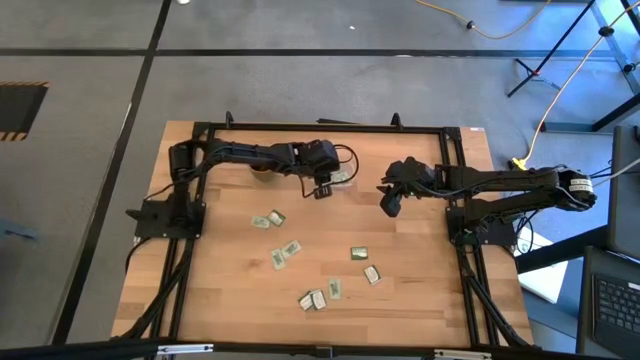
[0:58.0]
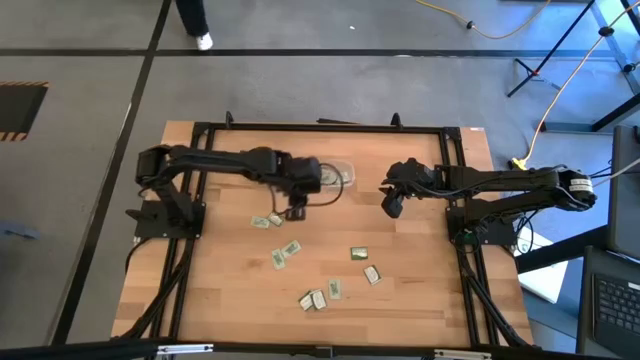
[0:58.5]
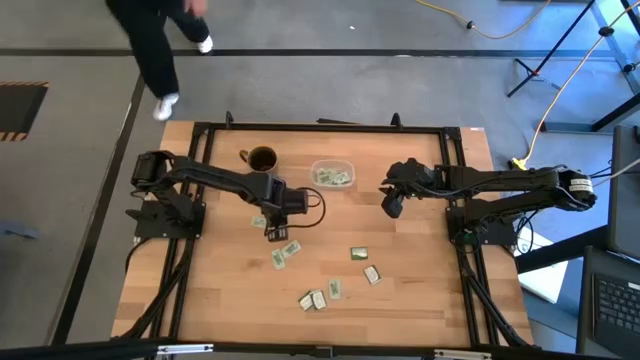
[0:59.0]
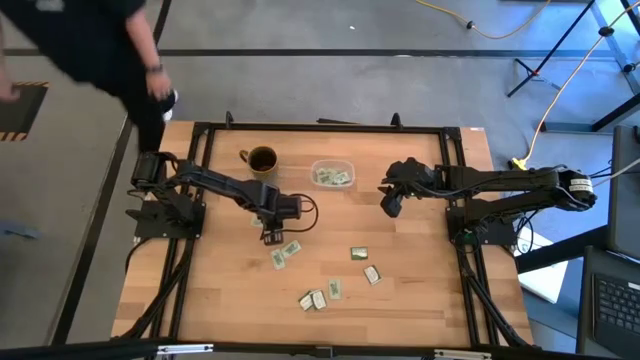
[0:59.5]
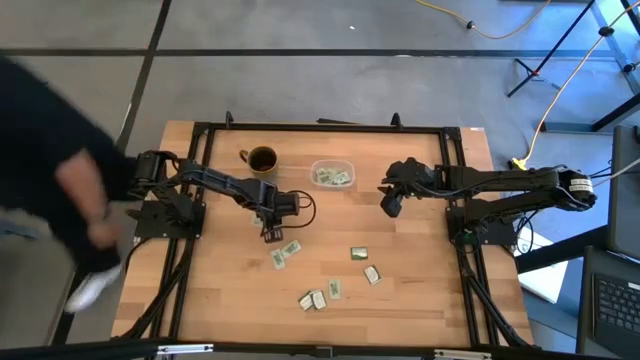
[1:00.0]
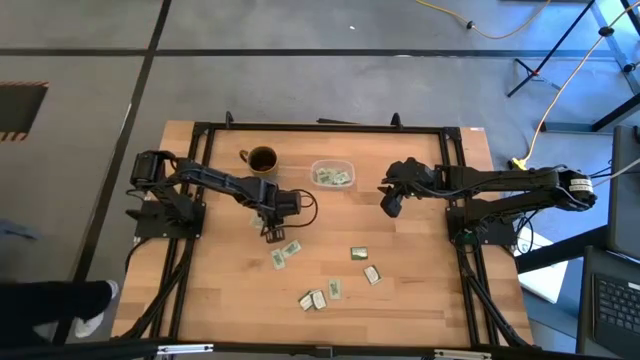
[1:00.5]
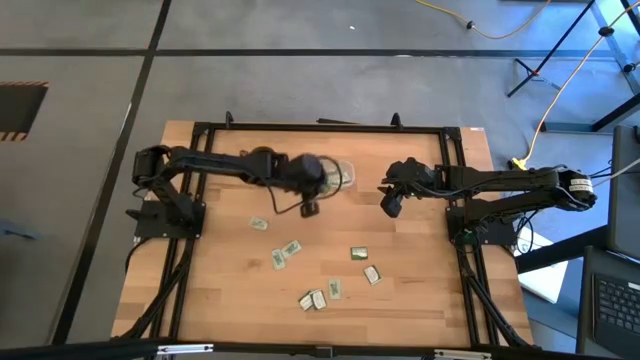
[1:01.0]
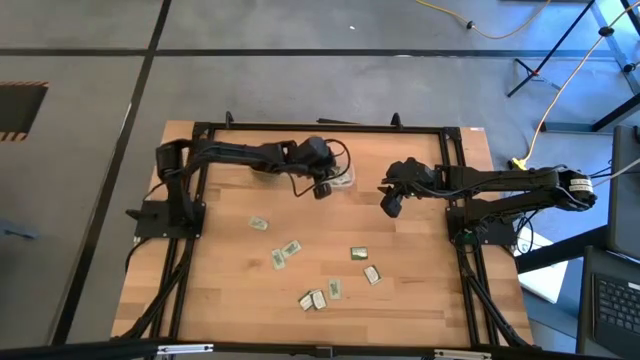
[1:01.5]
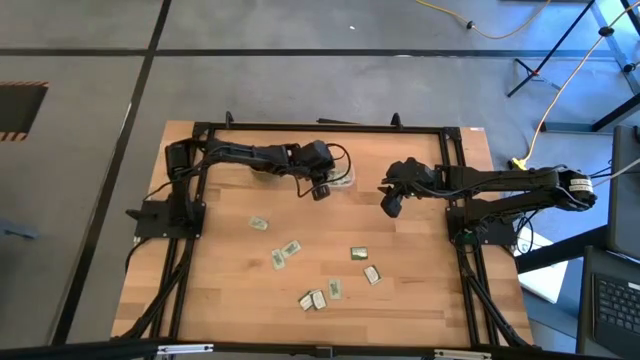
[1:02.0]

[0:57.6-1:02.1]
Task: Pick and place Stevia / Truvia into bins
Put the truvia packet into the transparent container

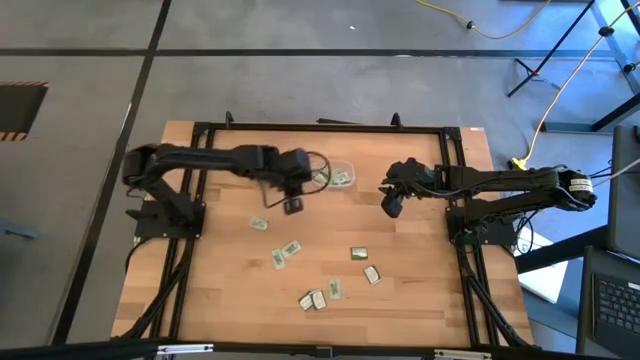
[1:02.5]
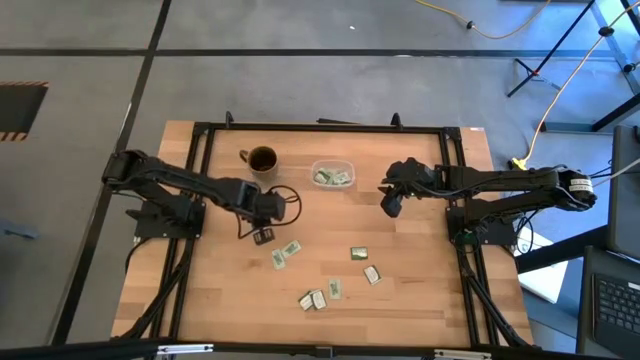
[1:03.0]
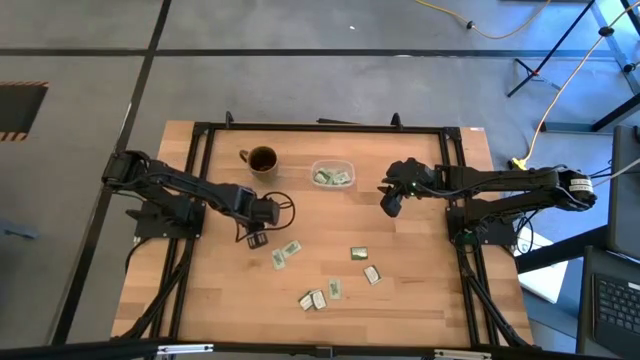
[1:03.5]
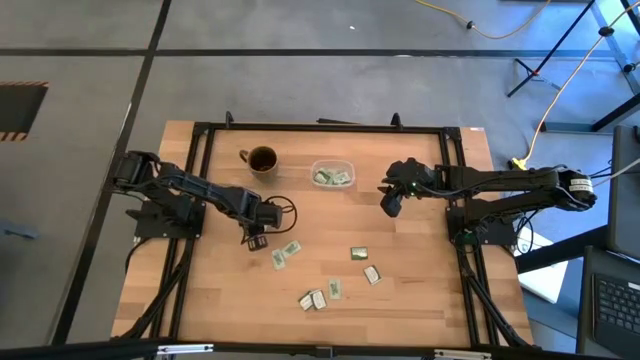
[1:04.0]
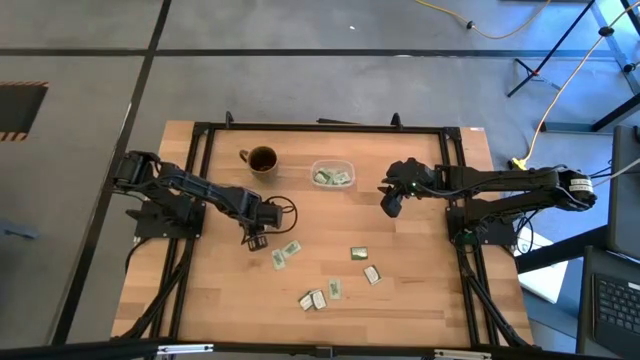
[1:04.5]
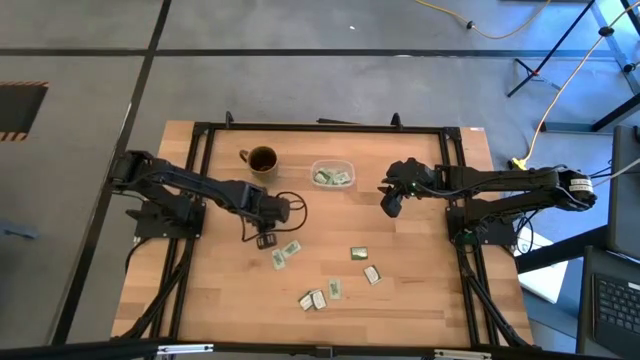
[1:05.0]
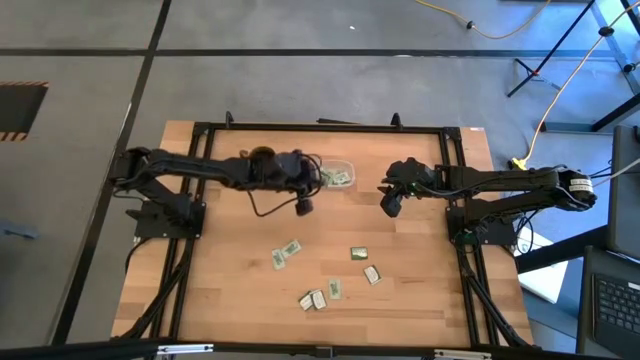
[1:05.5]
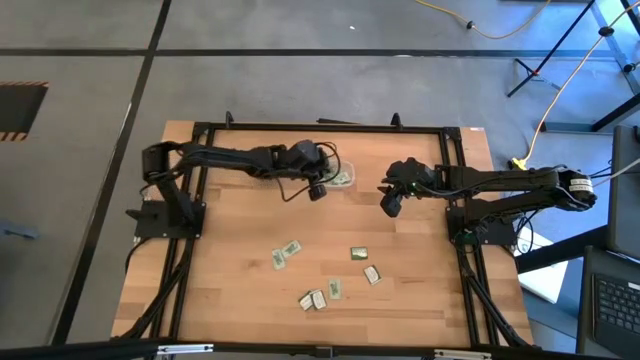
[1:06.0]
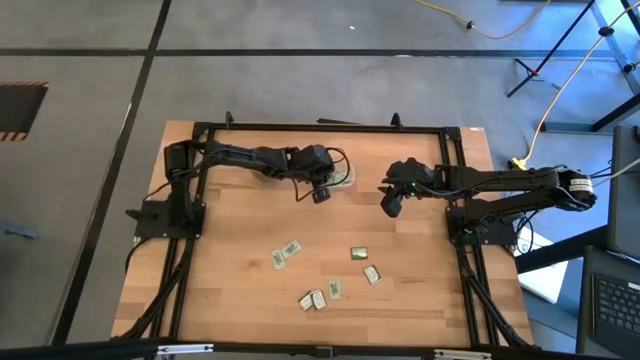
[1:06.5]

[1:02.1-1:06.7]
Put the stevia packet into the transparent container

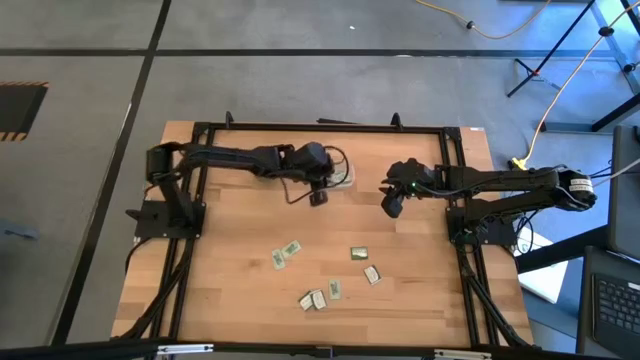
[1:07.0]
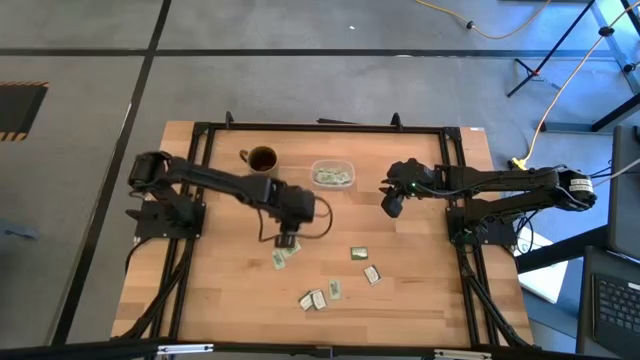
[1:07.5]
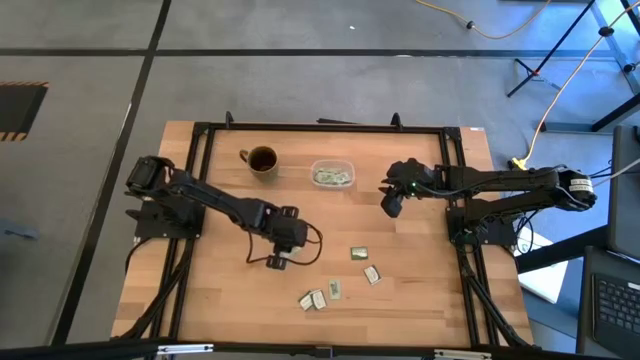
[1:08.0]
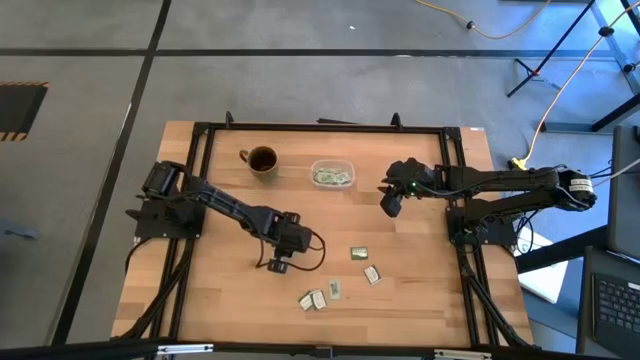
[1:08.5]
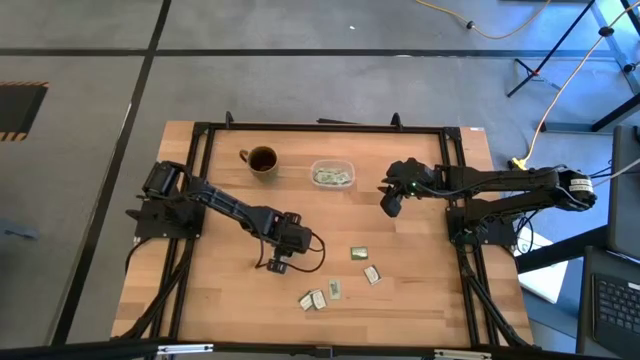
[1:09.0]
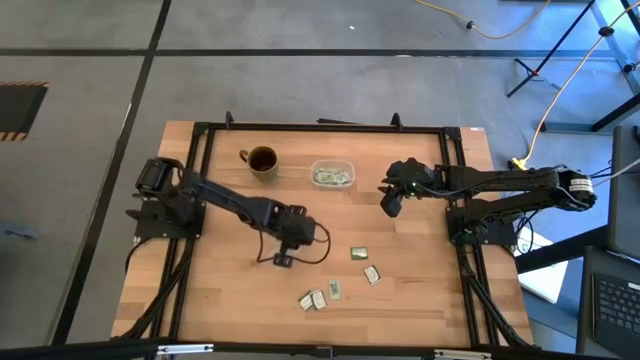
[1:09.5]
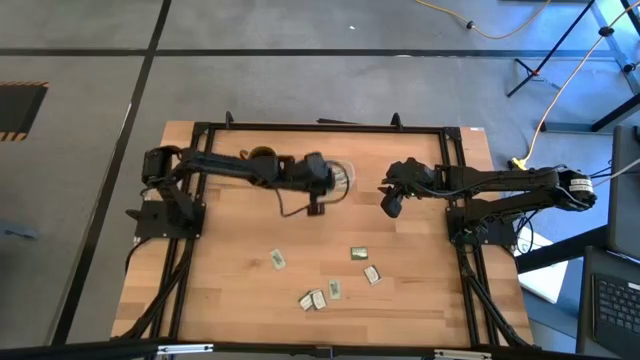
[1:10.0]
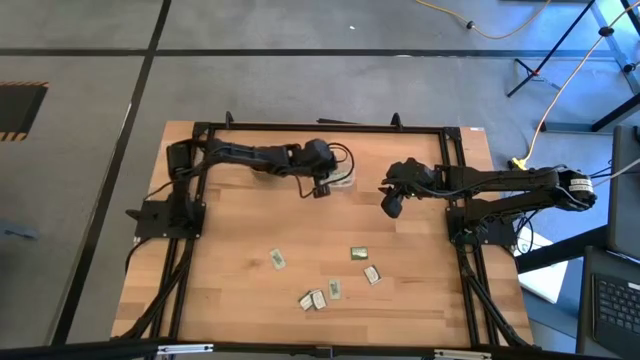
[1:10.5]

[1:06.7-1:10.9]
Put the stevia packet into the transparent container

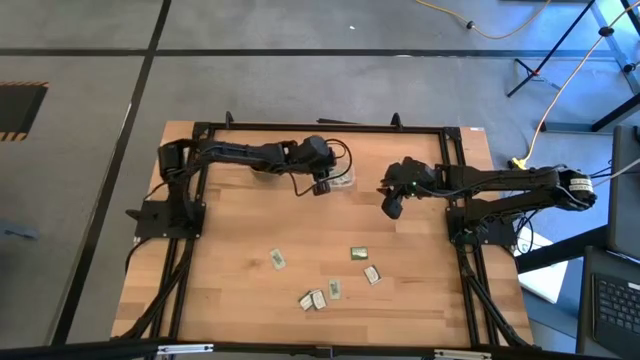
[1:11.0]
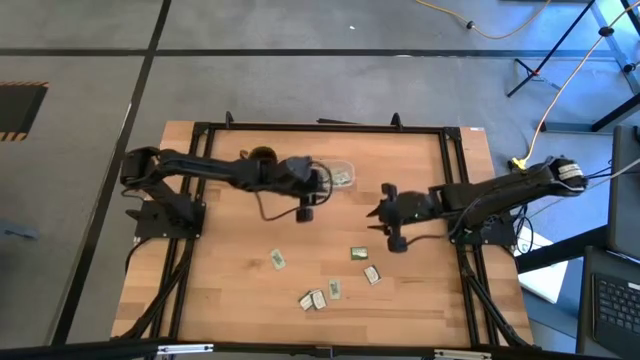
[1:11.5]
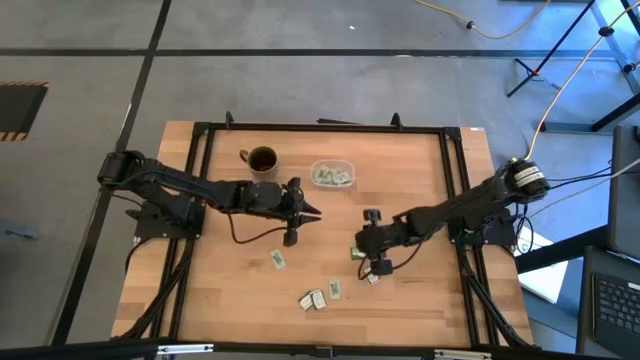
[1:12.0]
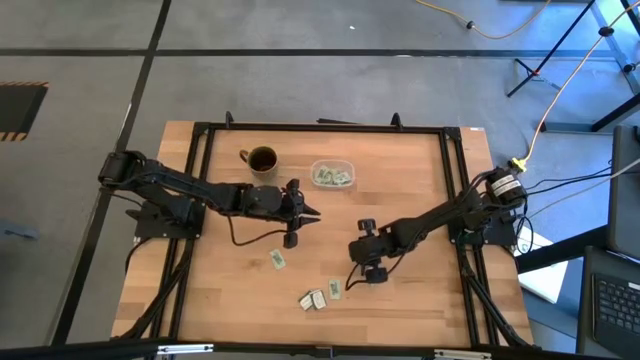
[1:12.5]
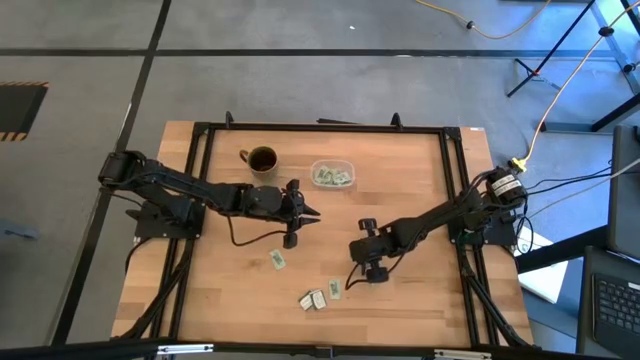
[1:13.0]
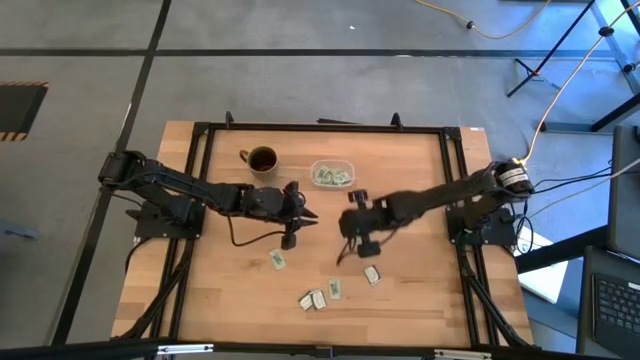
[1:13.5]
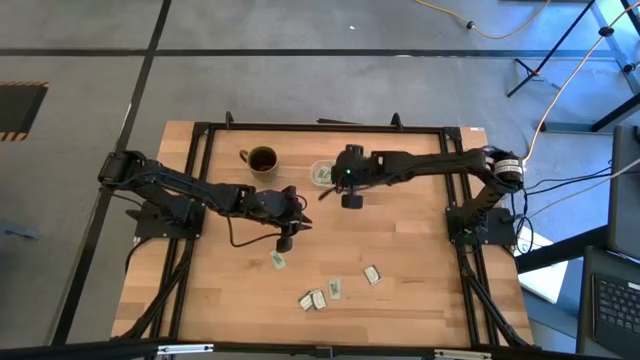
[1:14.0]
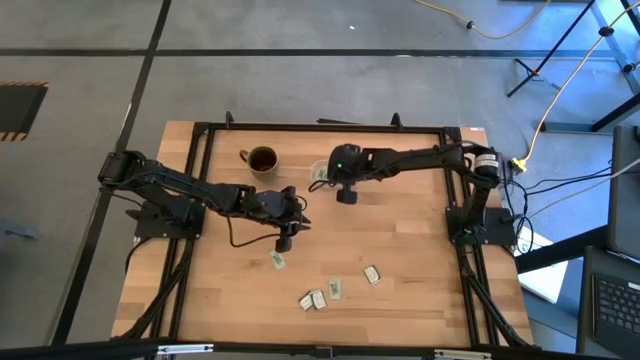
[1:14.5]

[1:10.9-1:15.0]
Put the truvia packet into the transparent container

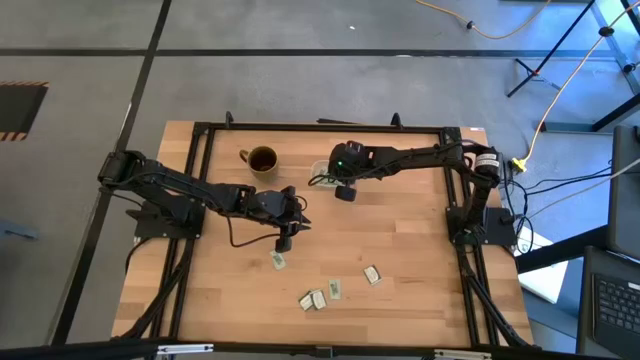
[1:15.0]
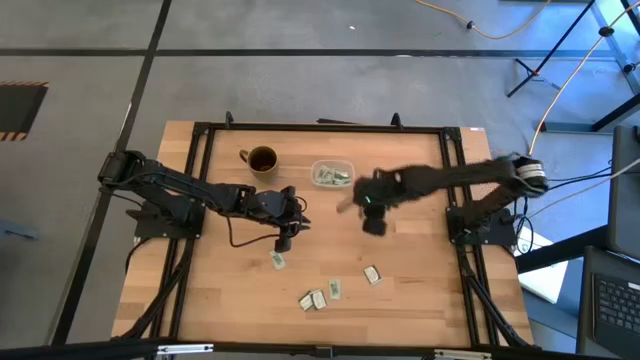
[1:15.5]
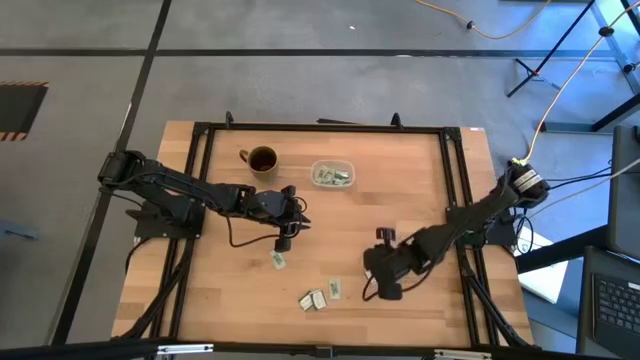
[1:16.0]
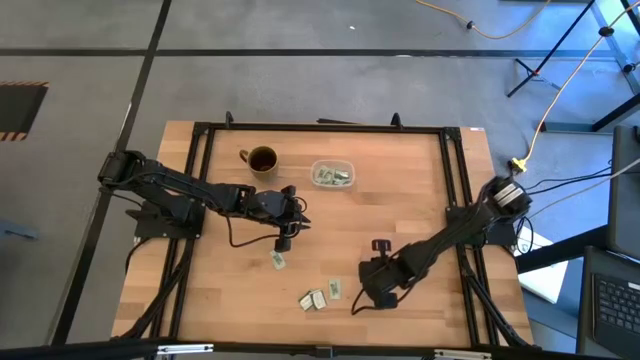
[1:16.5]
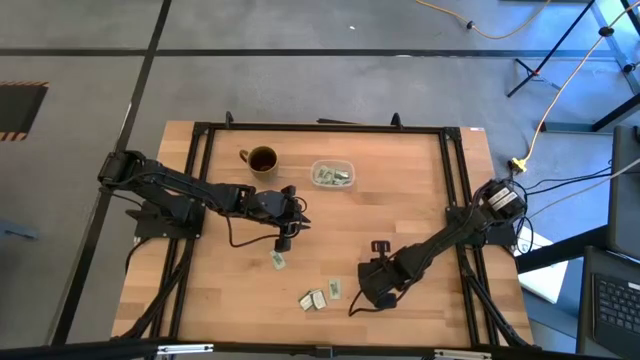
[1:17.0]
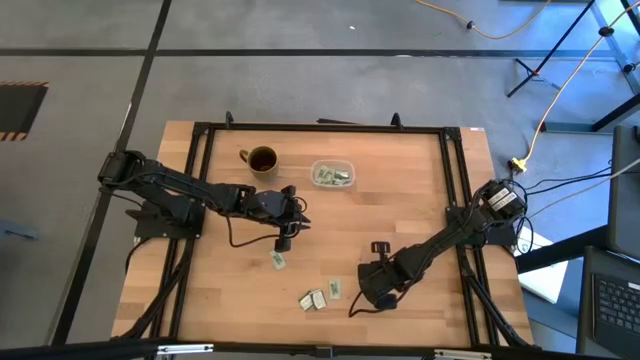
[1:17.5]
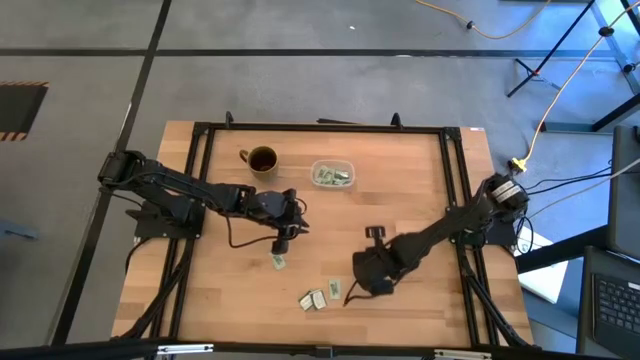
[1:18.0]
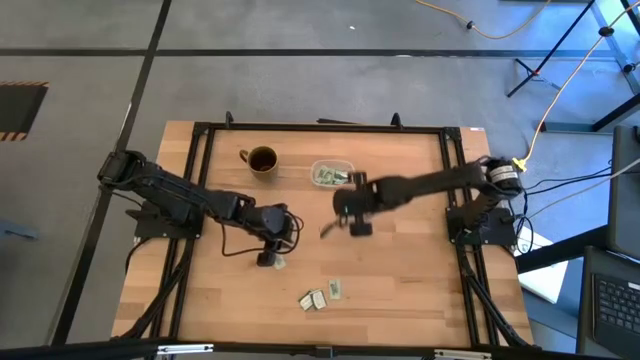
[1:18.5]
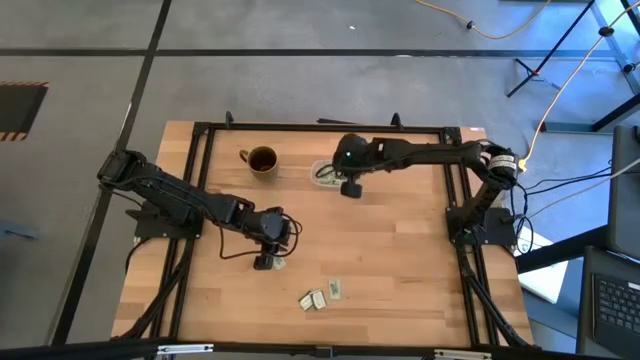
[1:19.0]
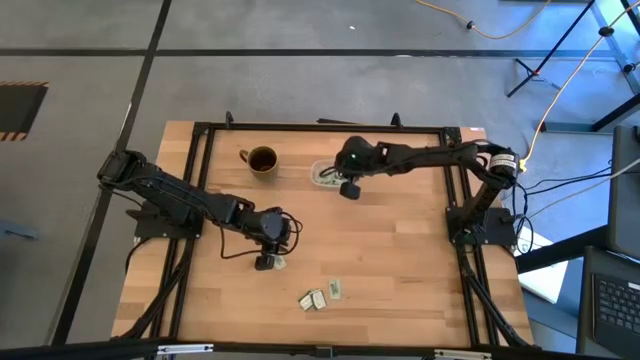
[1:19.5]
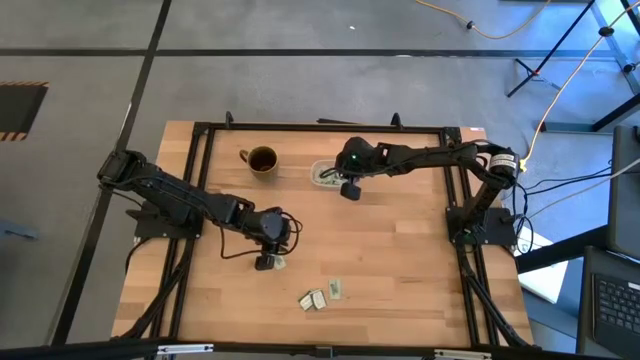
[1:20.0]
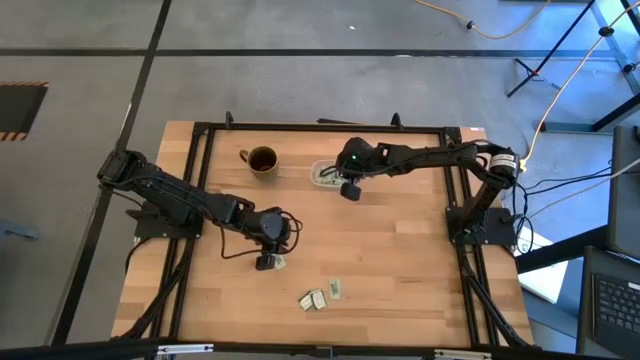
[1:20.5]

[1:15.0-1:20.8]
Put the truvia packet into the transparent container
